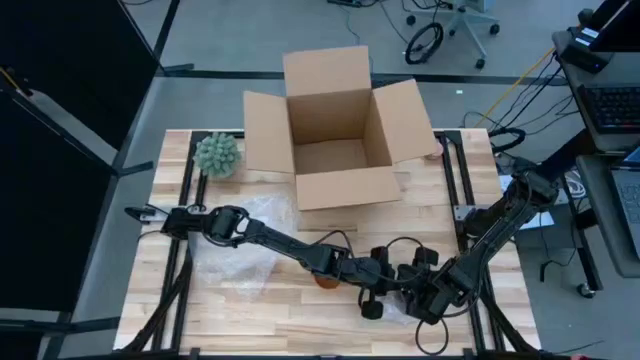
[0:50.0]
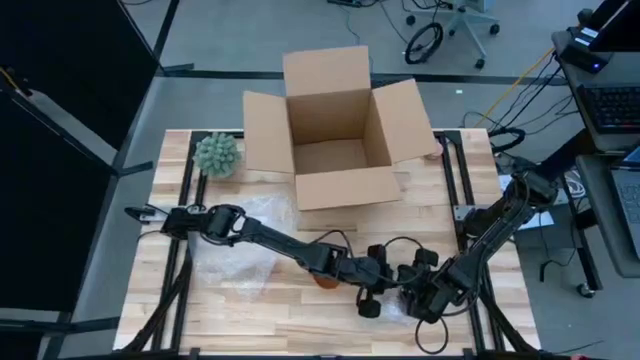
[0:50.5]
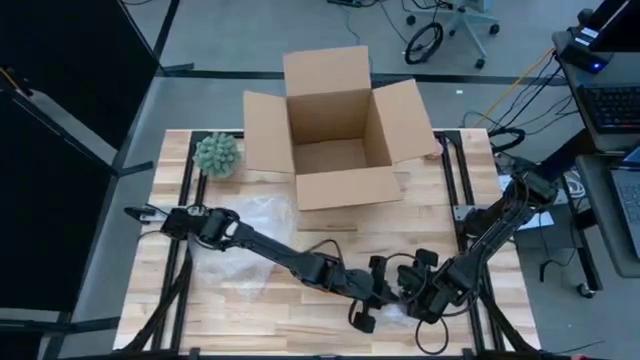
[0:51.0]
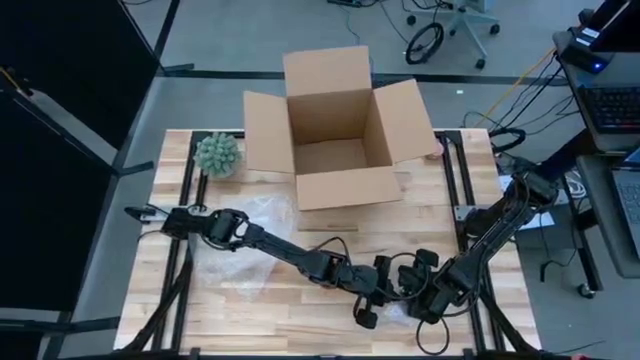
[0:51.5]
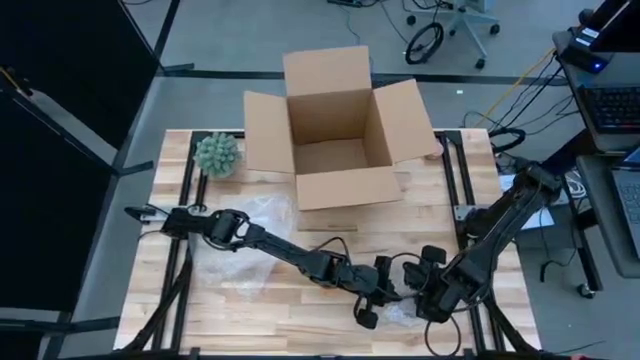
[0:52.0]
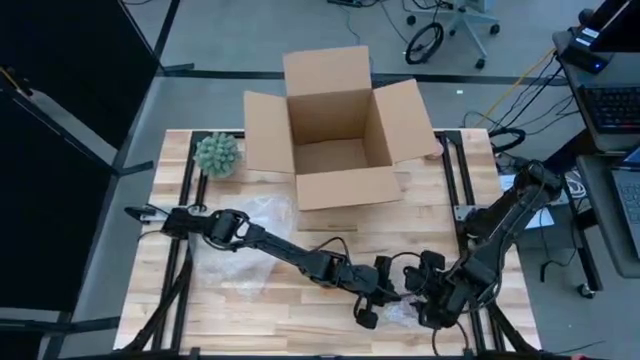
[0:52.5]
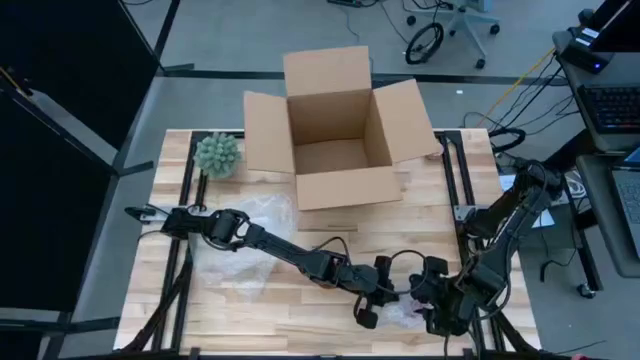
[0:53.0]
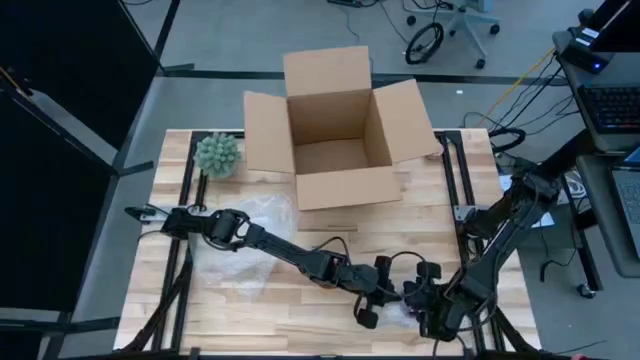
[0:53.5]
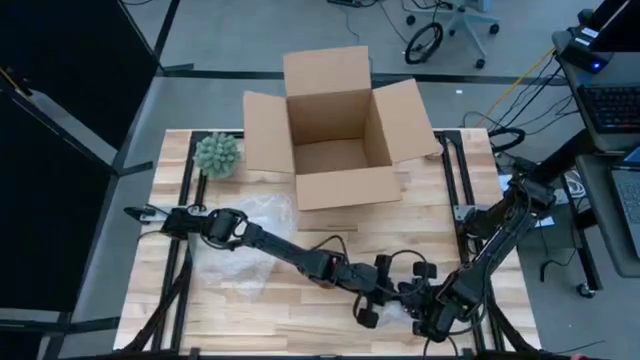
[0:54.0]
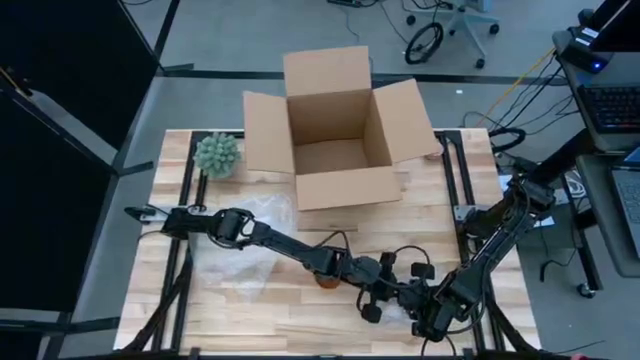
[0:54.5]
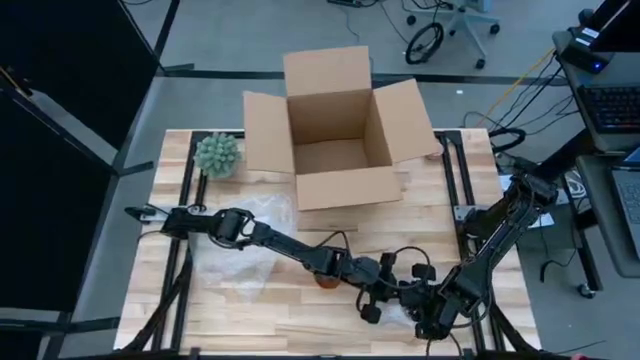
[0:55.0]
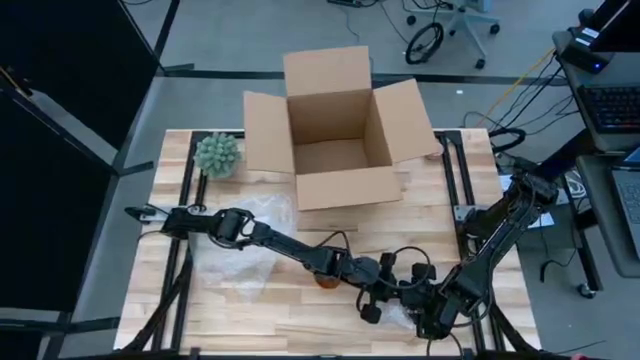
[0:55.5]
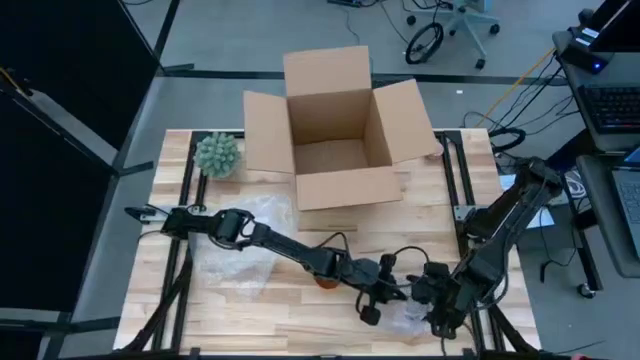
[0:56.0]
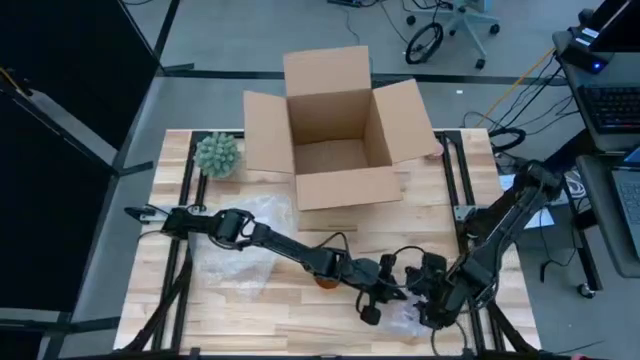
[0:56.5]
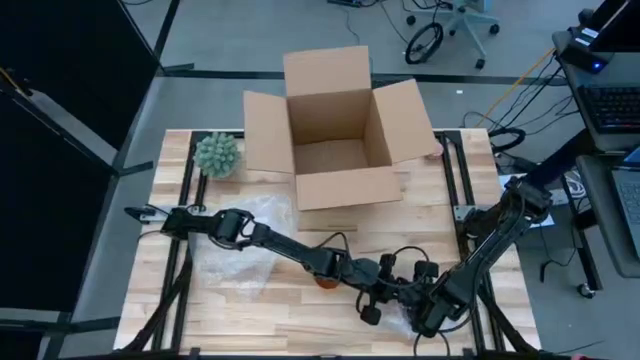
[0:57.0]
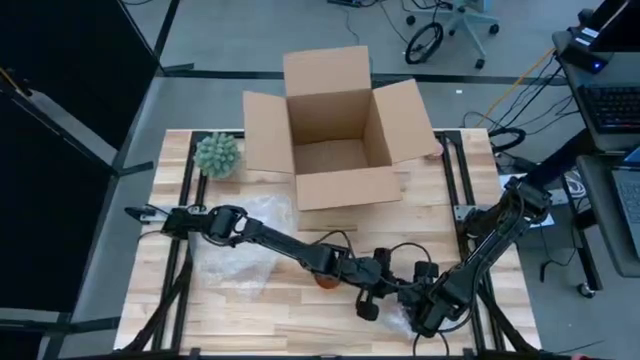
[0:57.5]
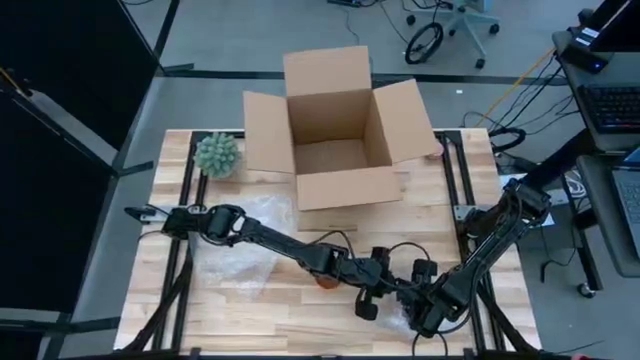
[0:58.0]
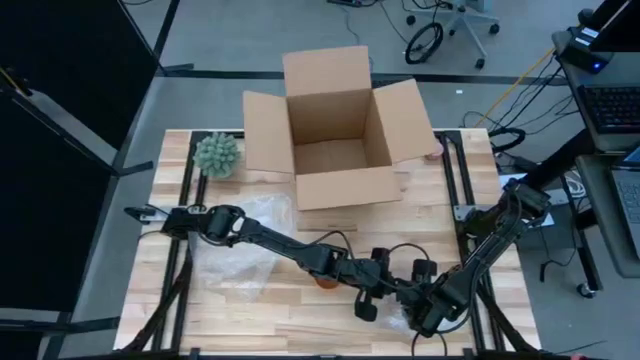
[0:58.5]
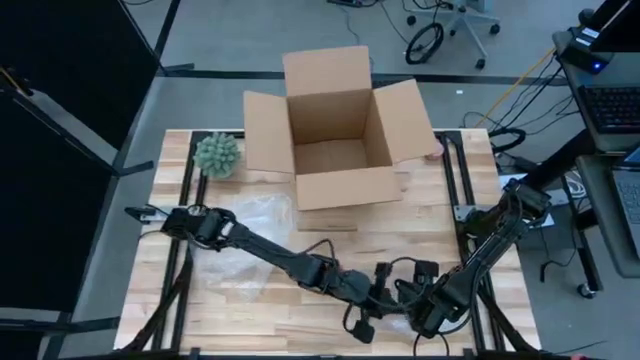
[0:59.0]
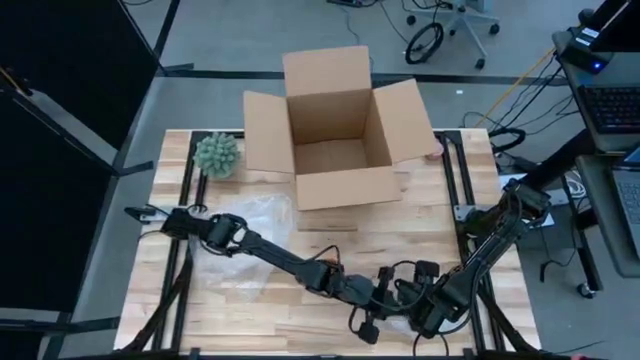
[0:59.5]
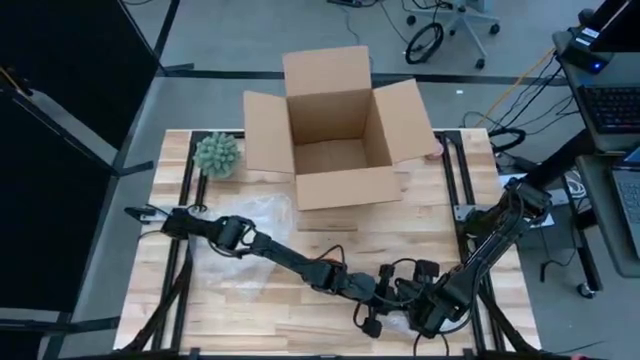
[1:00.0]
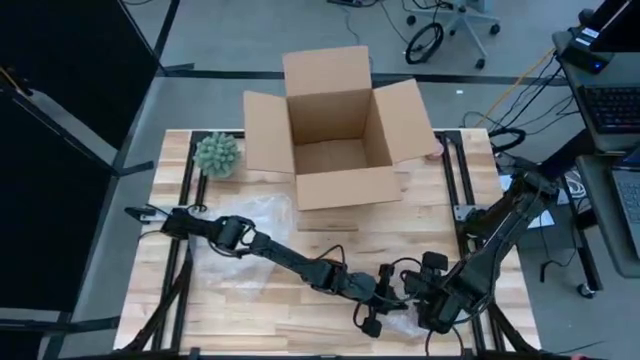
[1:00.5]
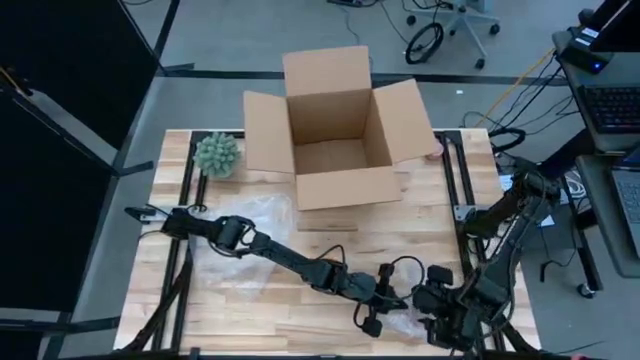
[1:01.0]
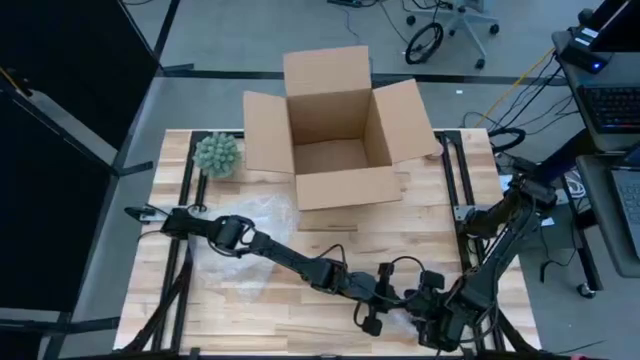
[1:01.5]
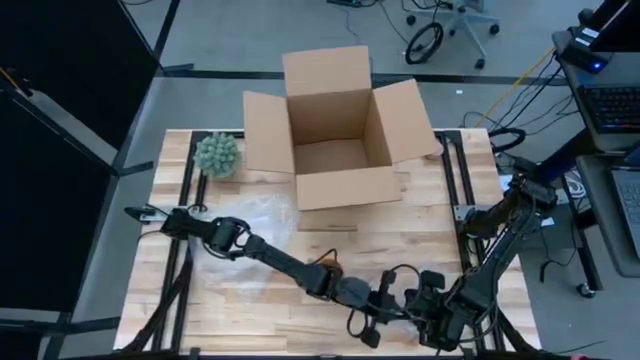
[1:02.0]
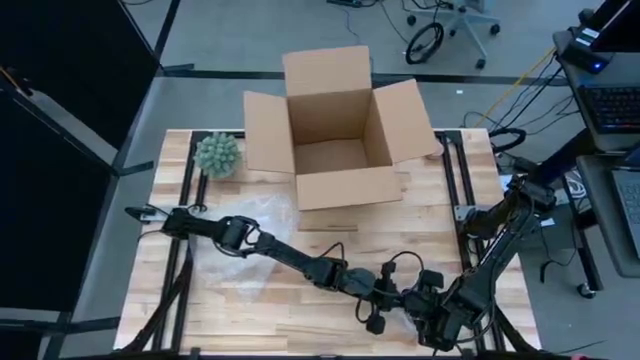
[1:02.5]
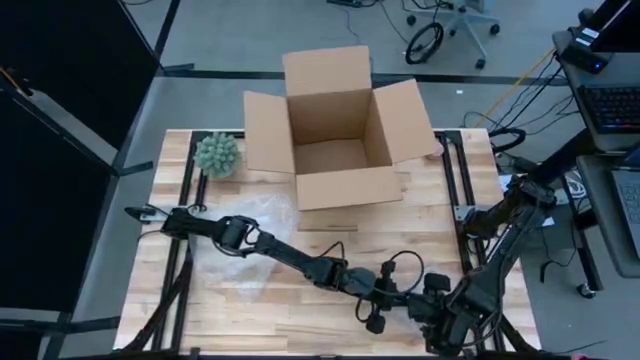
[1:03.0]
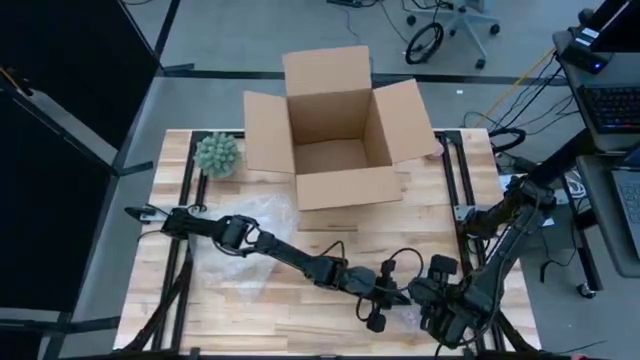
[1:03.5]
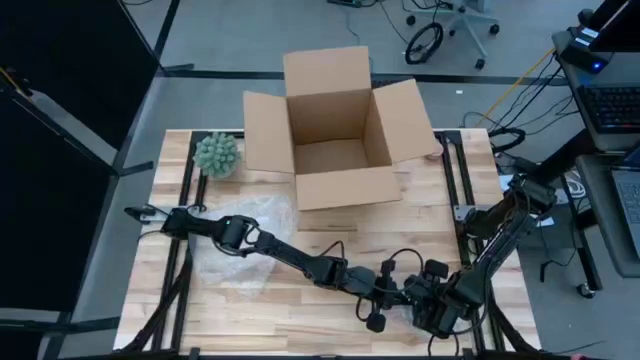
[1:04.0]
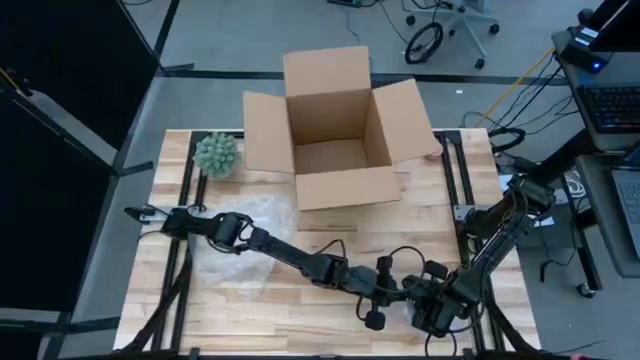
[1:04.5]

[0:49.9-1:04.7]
Task: wrap mug
Wrap the pink mug with the right bubble wrap

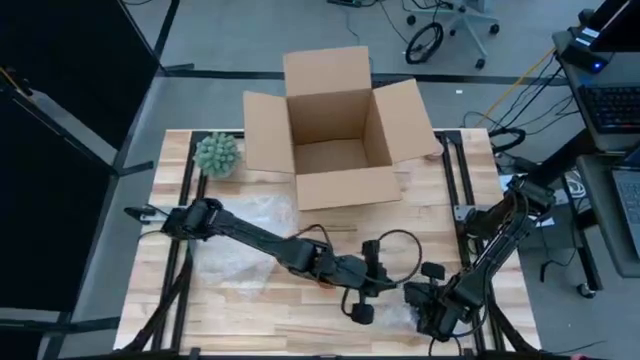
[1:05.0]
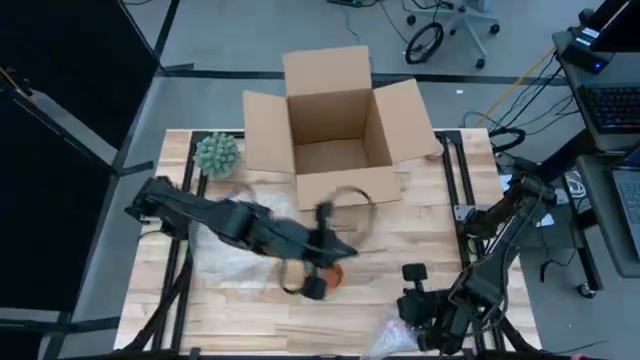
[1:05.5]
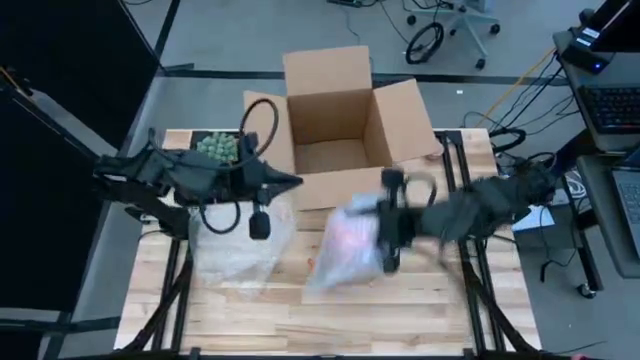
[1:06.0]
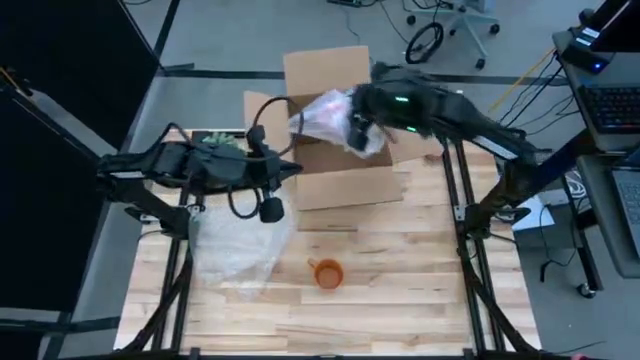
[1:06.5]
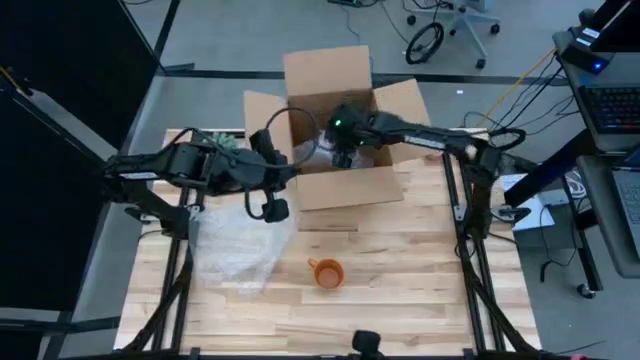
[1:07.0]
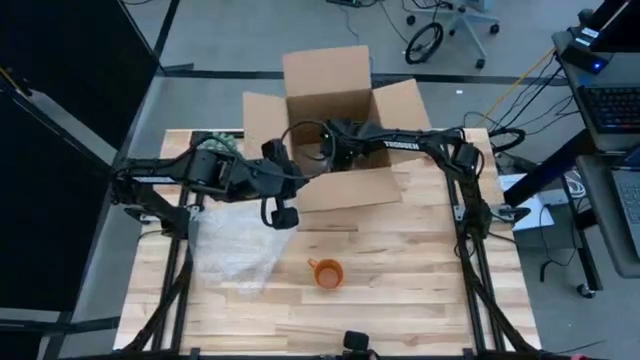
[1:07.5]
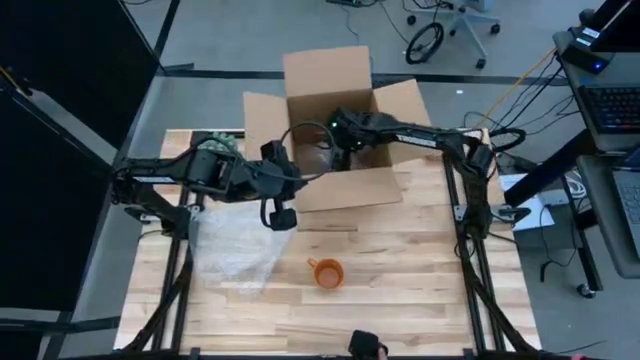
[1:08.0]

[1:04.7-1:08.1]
Put the wrapped pink mug into the box

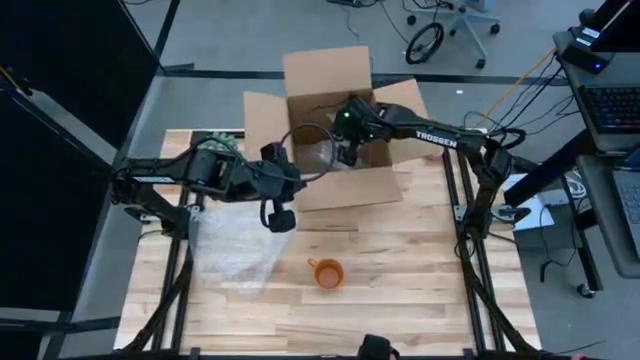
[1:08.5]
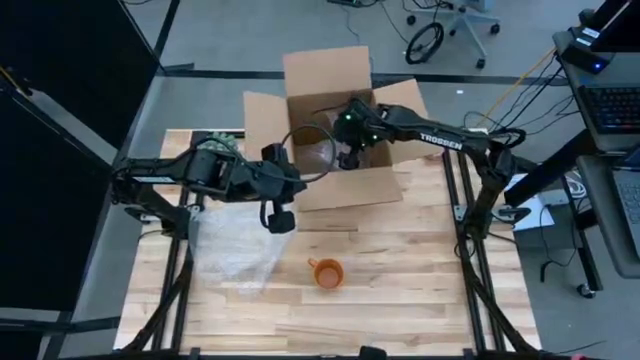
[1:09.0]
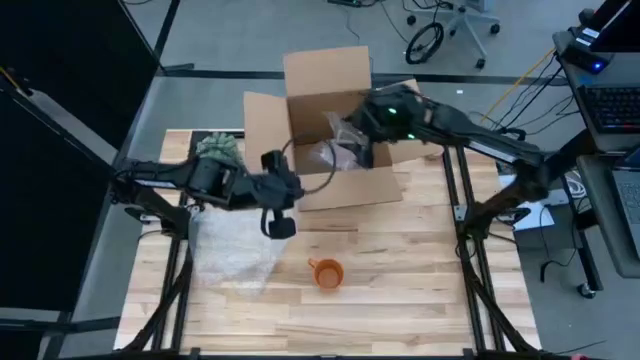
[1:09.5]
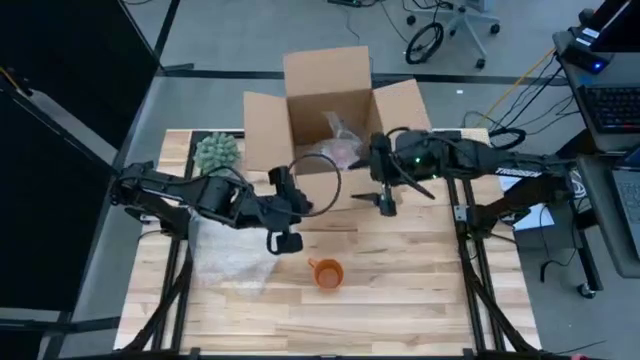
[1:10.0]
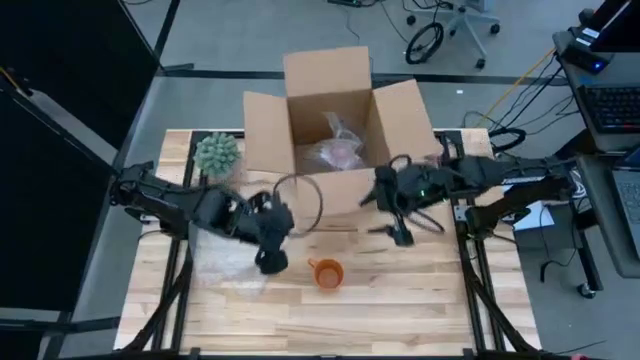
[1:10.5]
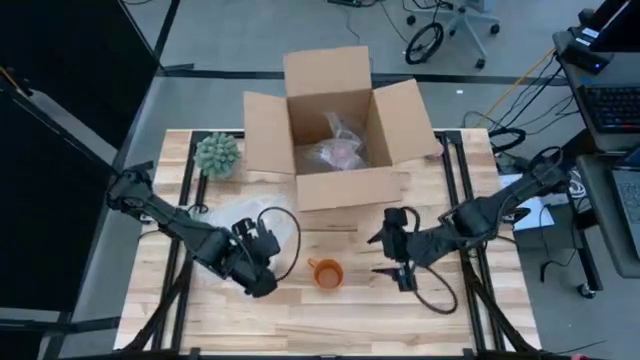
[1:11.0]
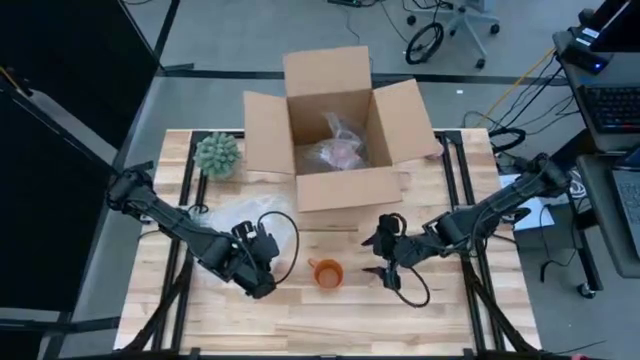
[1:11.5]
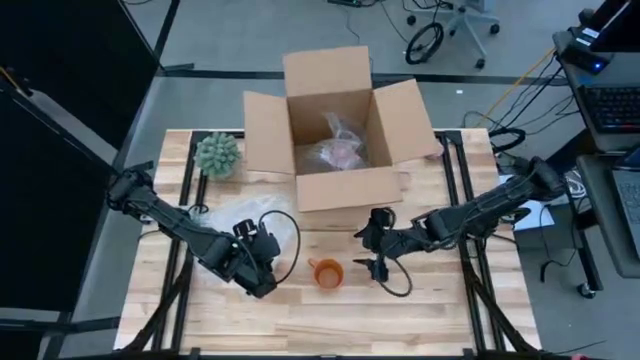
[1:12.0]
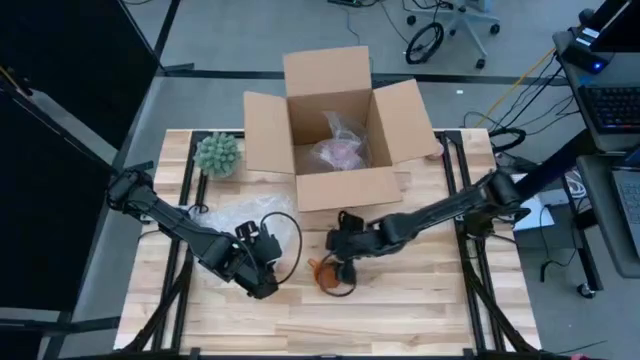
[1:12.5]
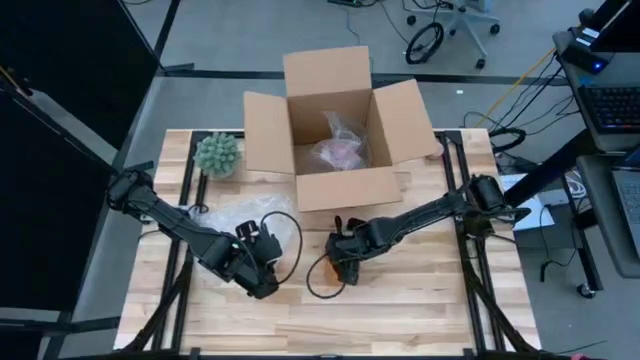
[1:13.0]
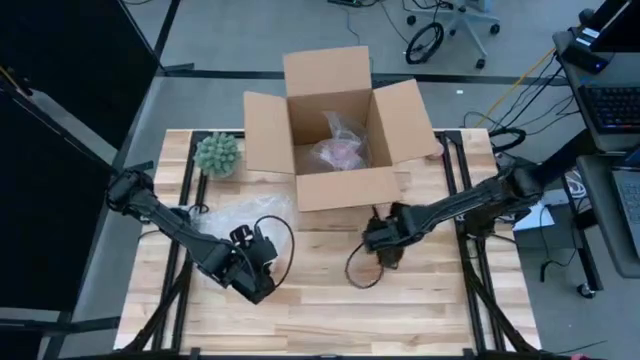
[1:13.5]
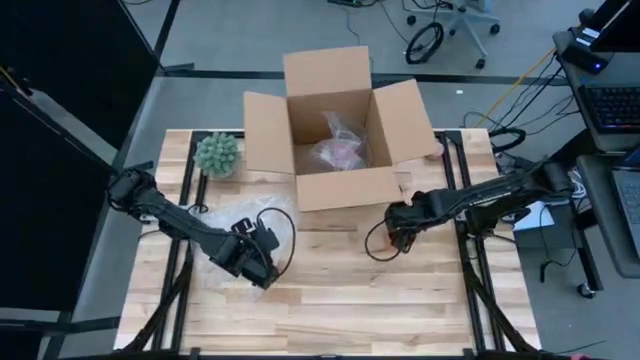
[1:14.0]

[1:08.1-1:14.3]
Move the orange mug to the right
